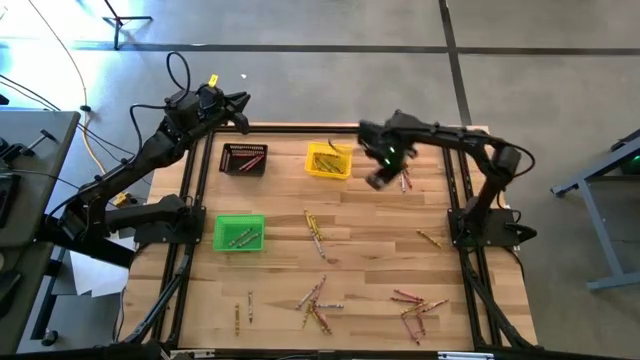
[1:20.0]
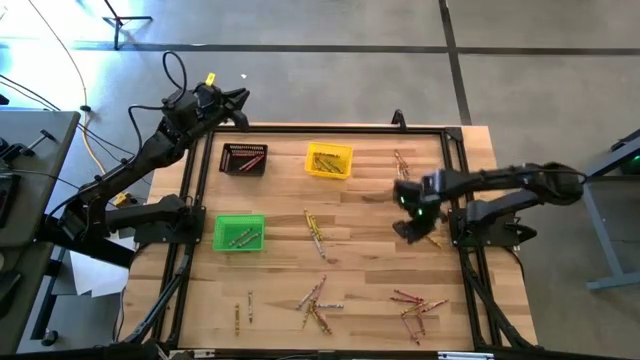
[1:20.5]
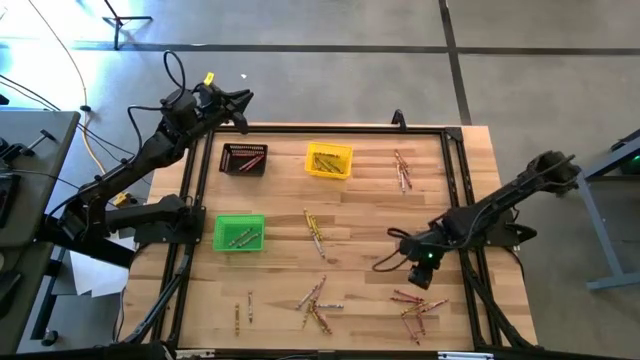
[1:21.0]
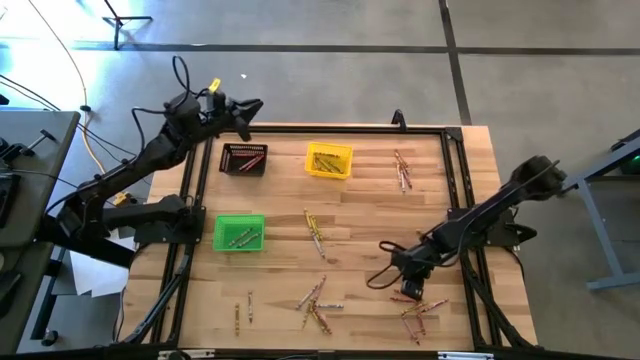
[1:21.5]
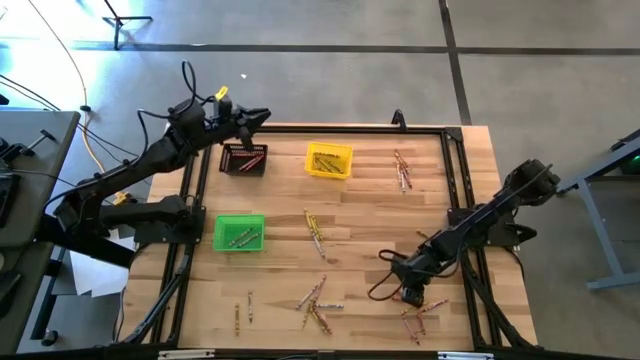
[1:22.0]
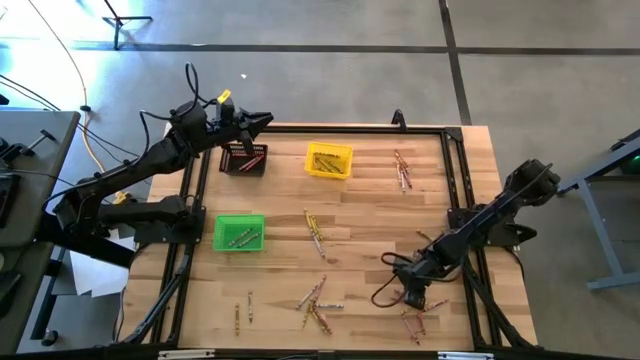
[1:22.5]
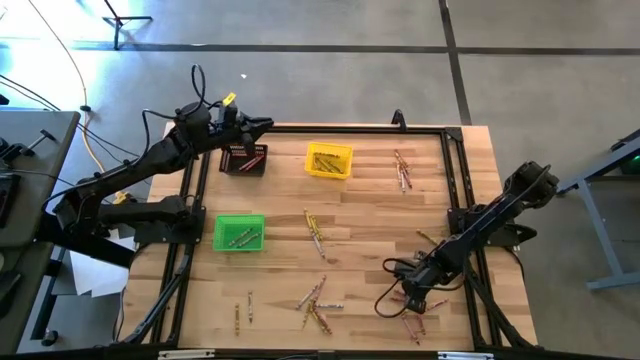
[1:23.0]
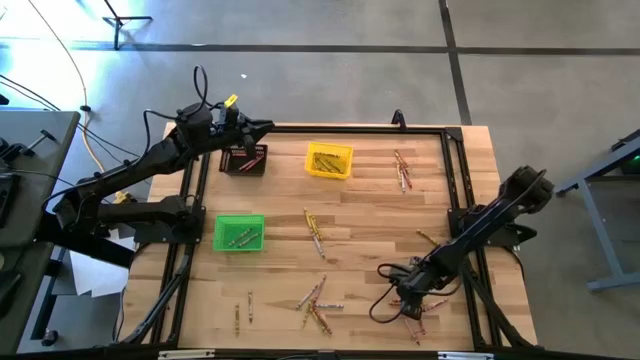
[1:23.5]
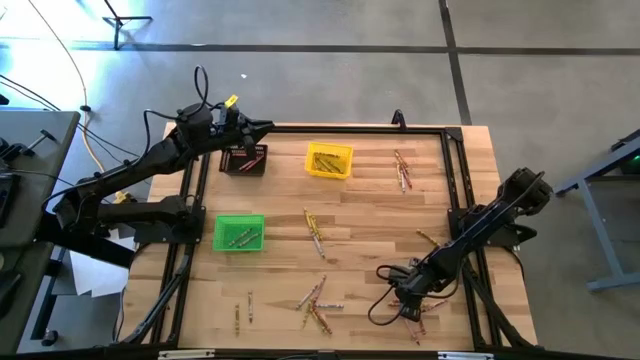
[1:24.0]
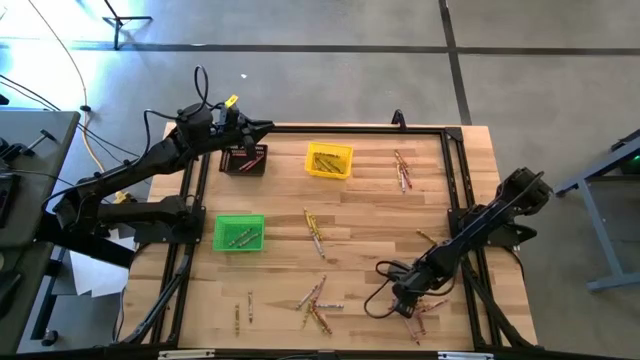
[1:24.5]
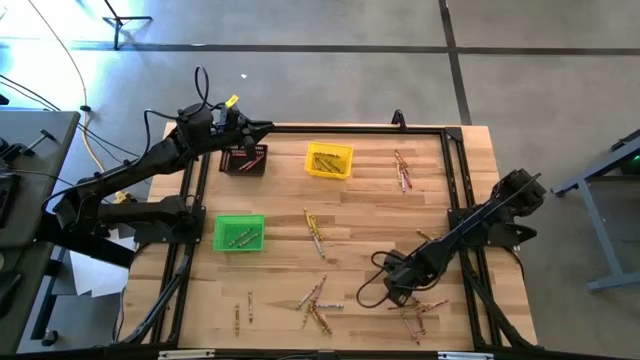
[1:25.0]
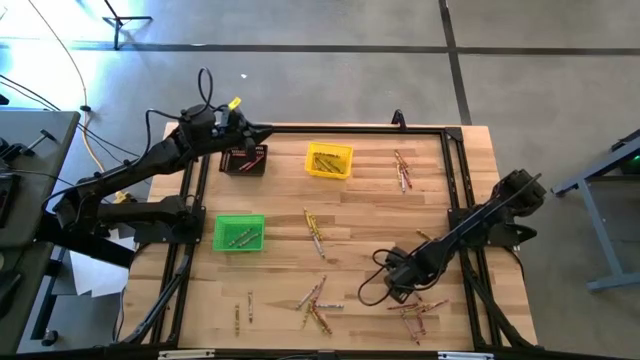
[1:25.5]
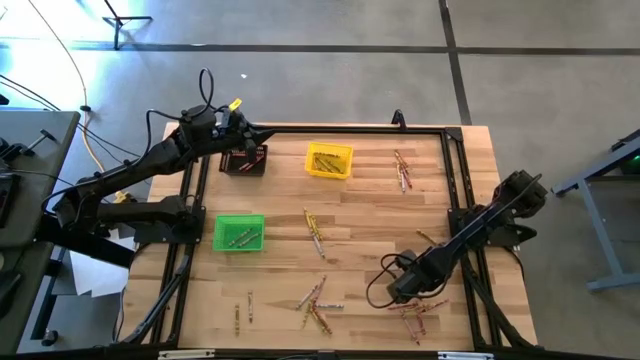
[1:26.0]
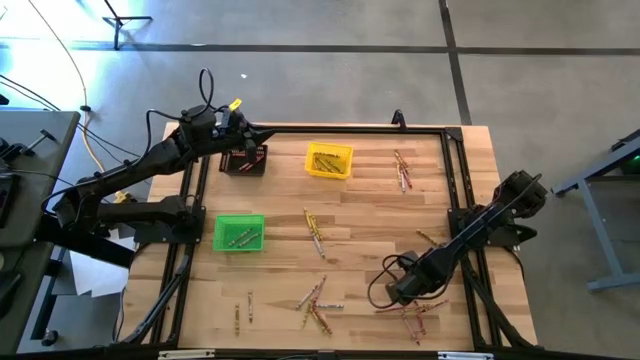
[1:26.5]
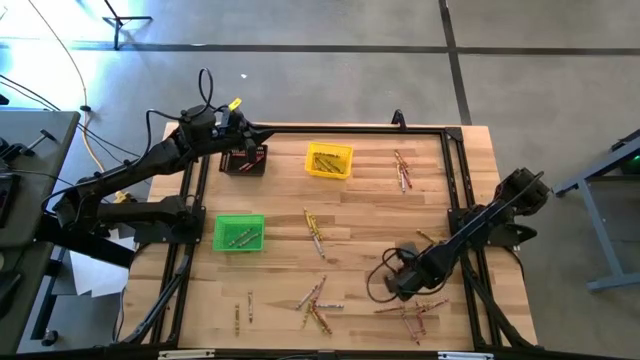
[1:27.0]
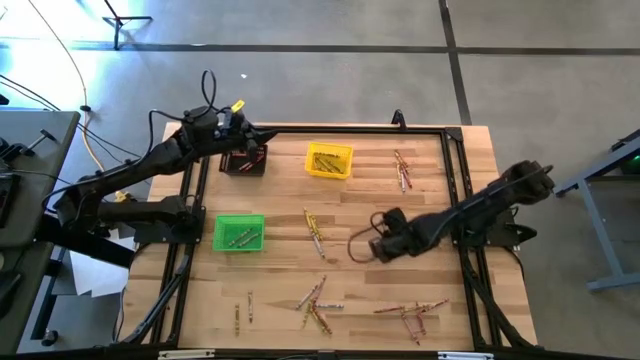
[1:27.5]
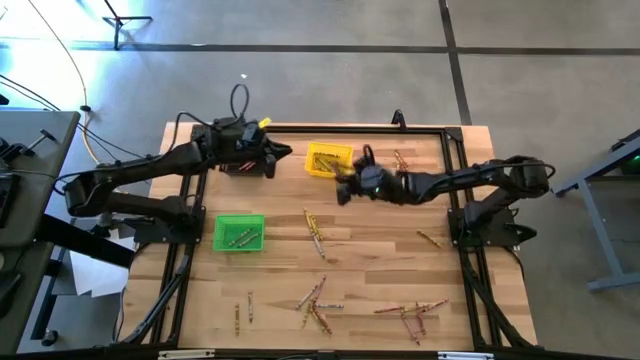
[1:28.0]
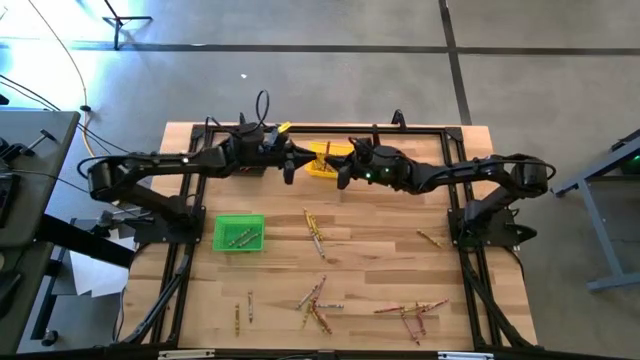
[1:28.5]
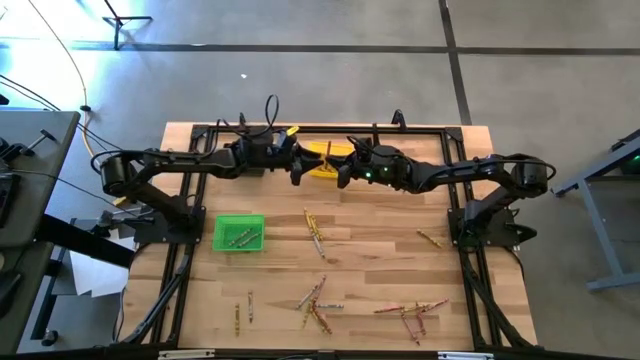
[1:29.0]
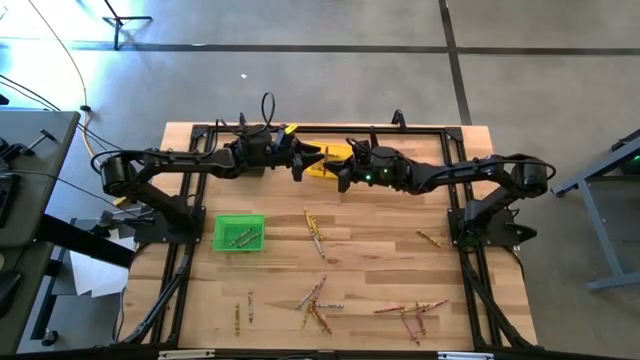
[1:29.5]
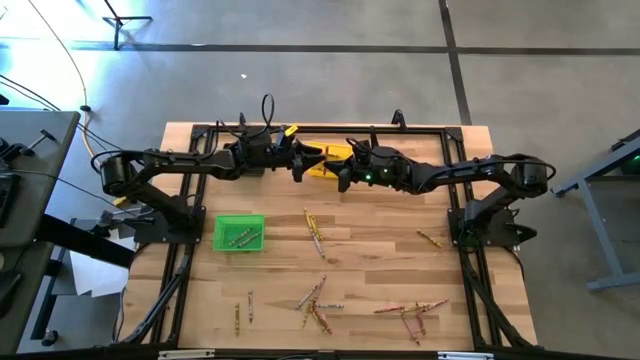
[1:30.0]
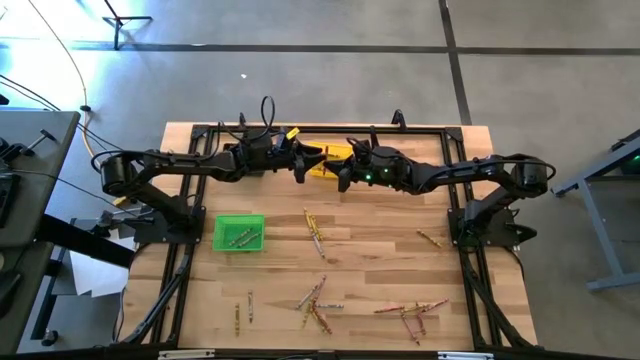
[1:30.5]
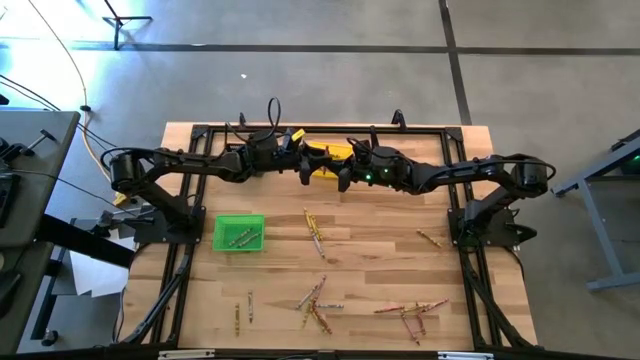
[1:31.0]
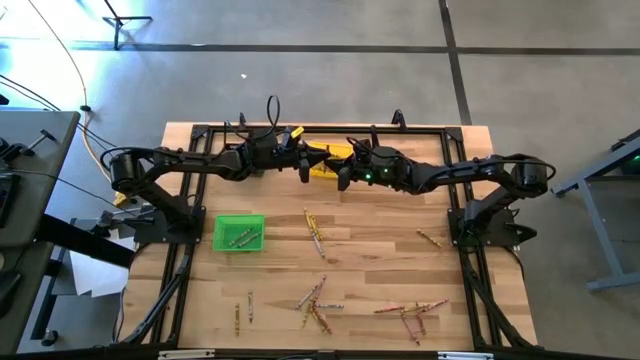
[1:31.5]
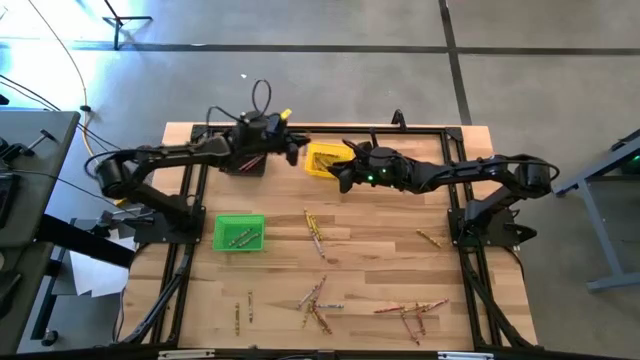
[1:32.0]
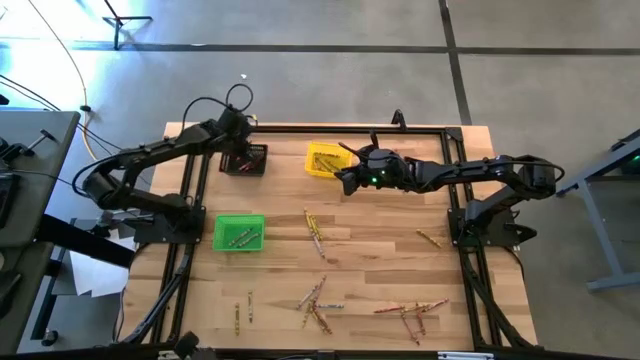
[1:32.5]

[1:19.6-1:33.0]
Task: Sort crayons
Put the red crayon into the black bin

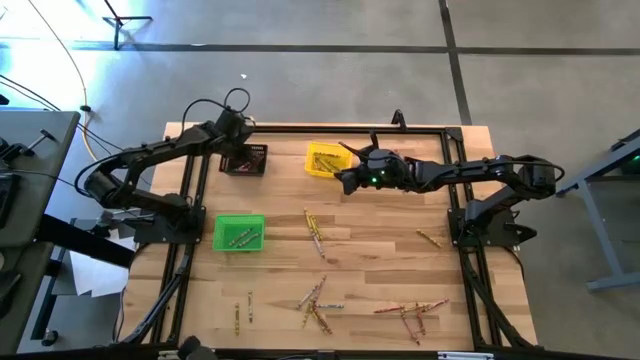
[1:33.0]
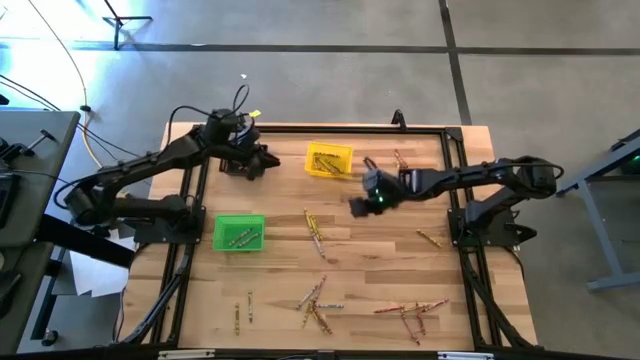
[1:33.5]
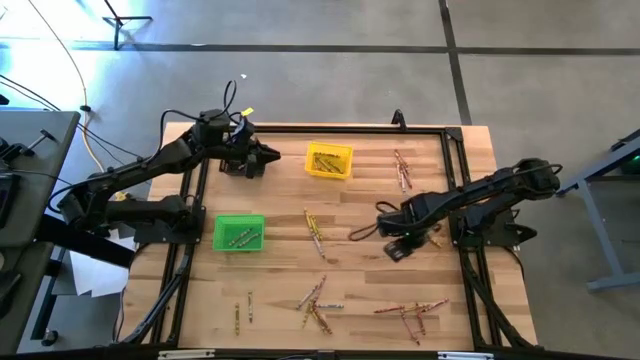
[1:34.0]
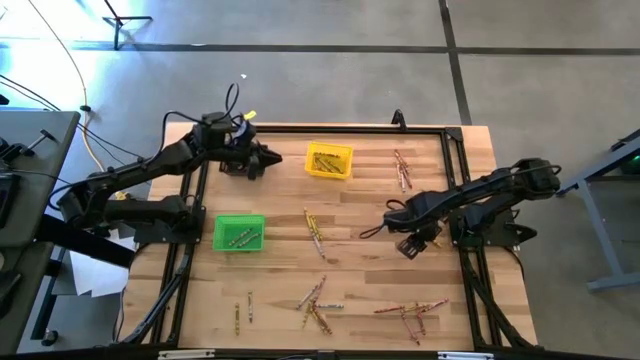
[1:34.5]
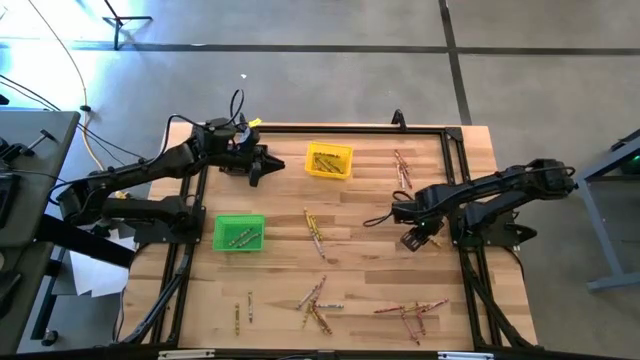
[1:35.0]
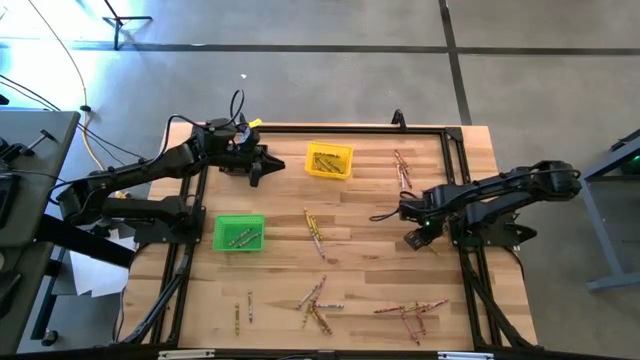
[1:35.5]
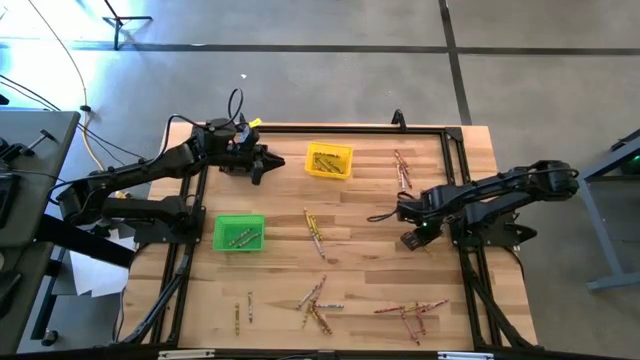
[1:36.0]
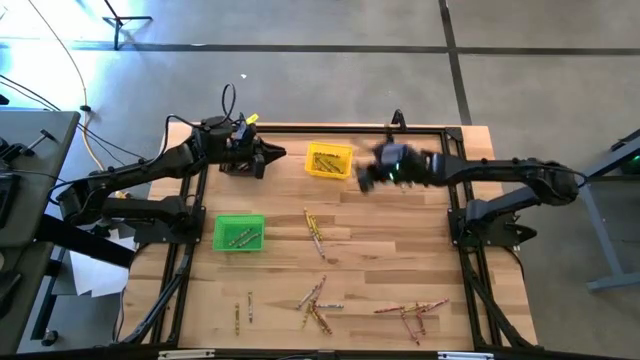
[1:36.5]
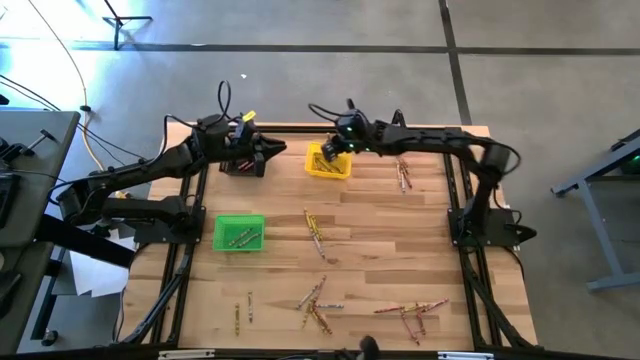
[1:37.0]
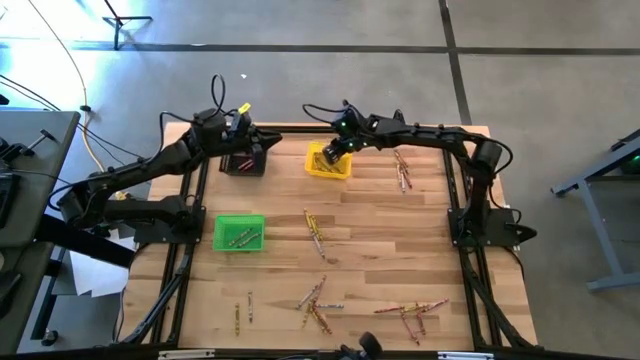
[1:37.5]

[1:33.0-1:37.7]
Put the yellow crayon into the yellow bin

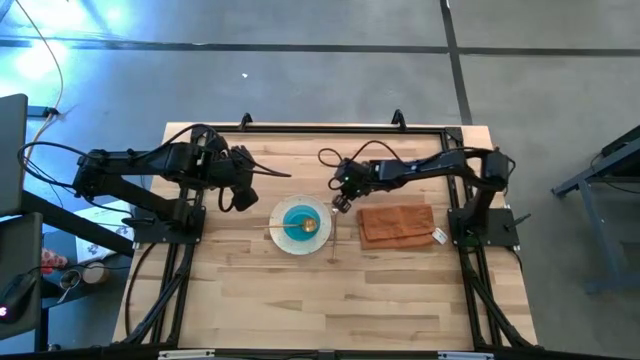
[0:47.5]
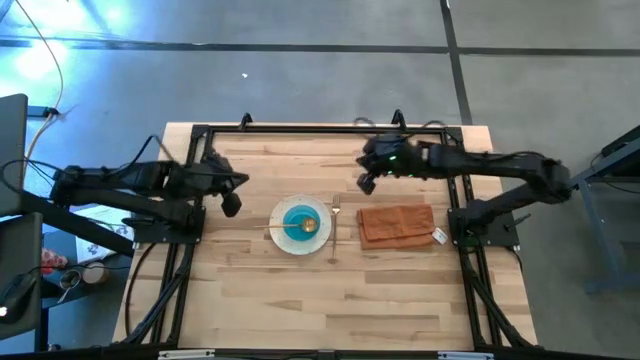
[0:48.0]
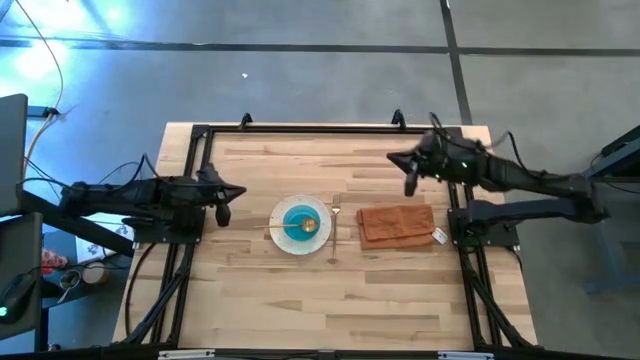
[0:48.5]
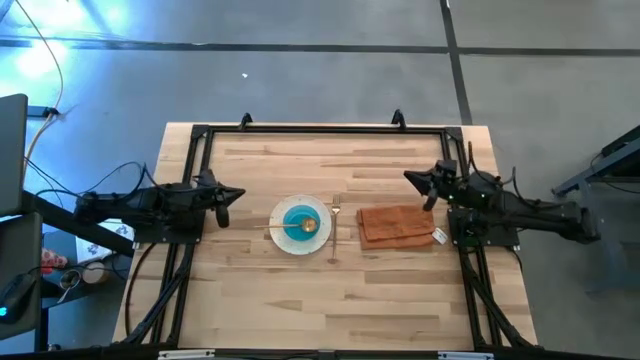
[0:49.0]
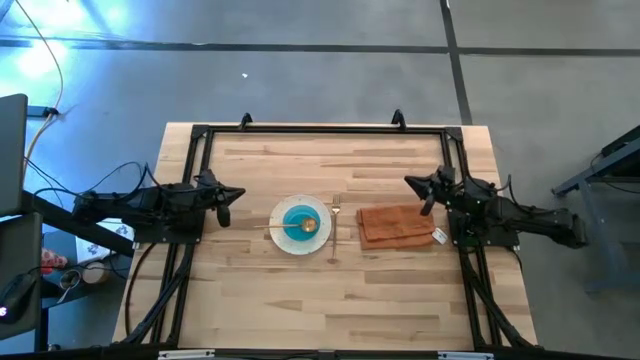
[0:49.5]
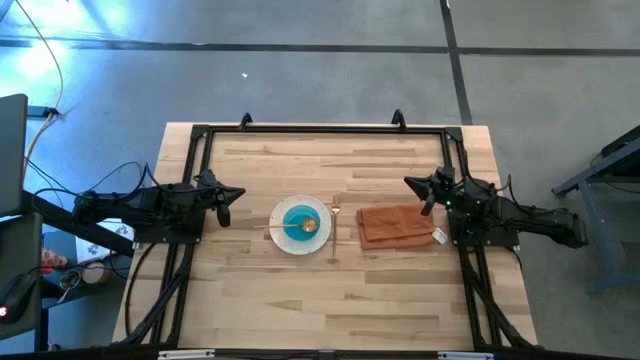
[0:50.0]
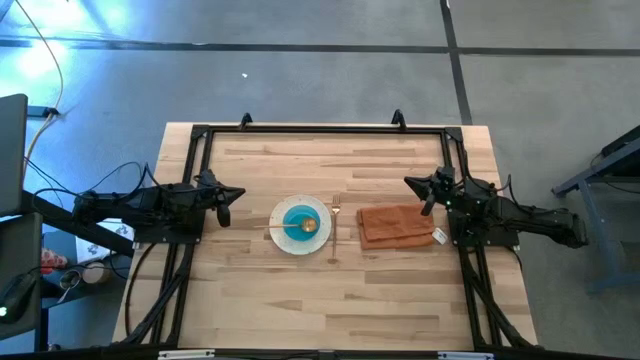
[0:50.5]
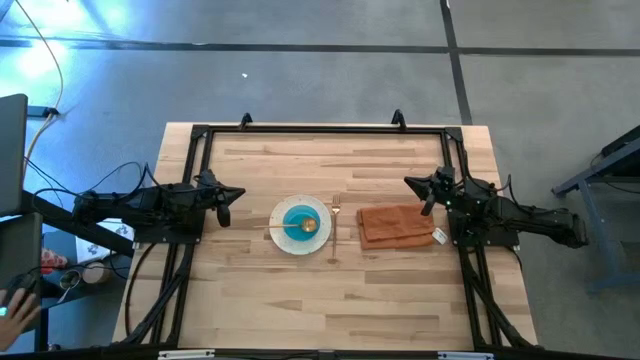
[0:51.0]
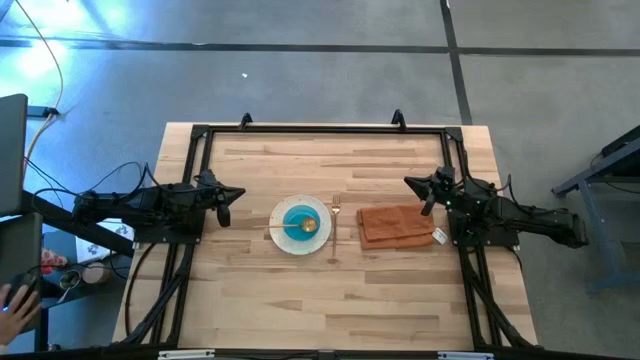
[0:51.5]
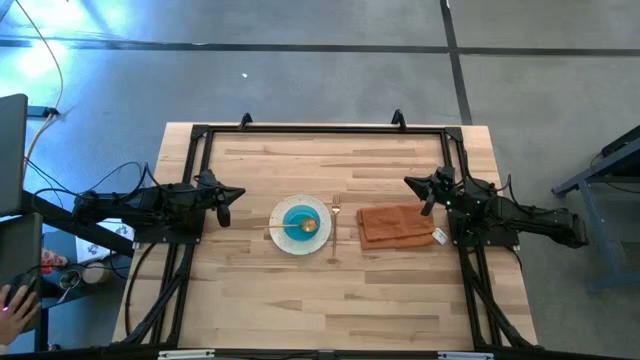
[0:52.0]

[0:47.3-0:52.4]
Task: Set table place
Return to Home Position
